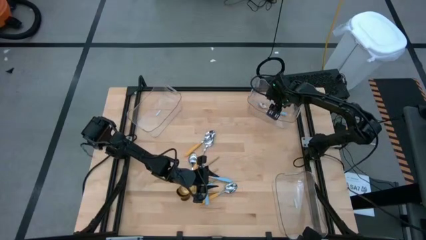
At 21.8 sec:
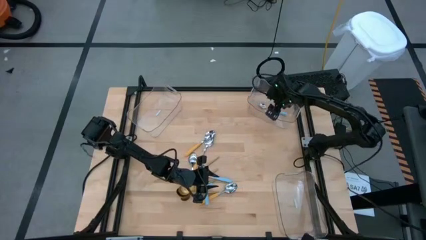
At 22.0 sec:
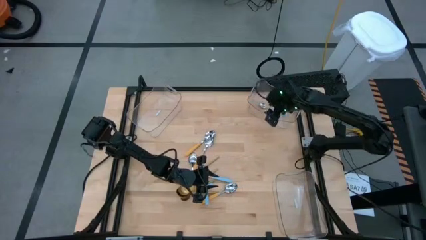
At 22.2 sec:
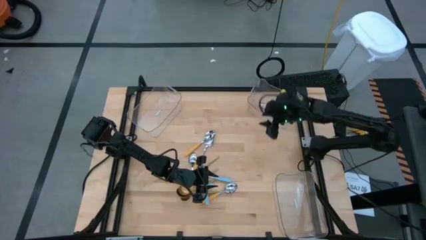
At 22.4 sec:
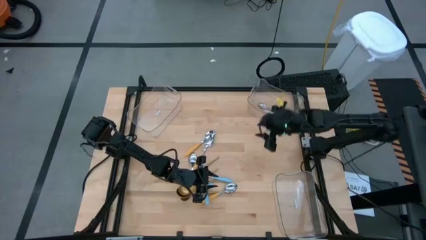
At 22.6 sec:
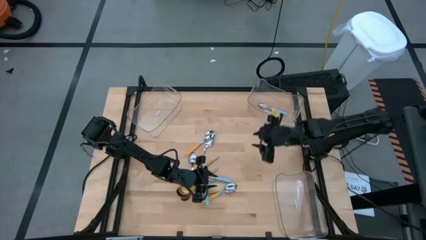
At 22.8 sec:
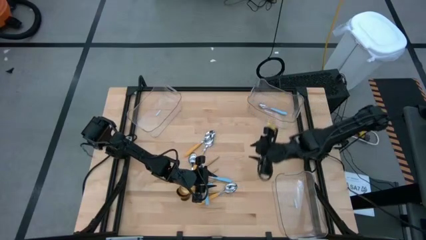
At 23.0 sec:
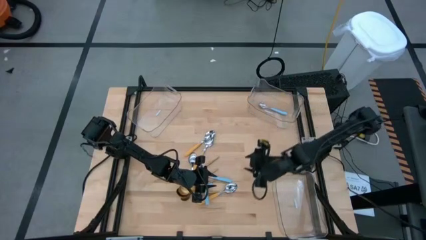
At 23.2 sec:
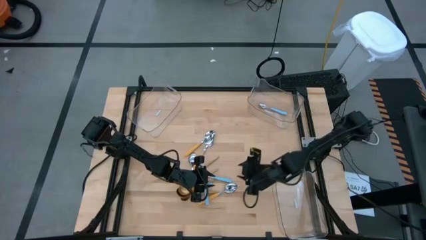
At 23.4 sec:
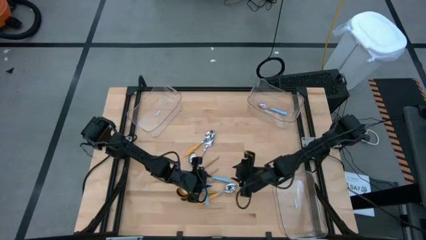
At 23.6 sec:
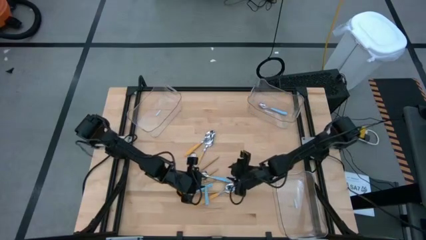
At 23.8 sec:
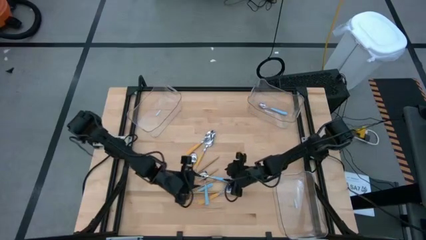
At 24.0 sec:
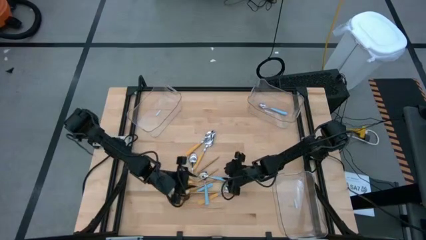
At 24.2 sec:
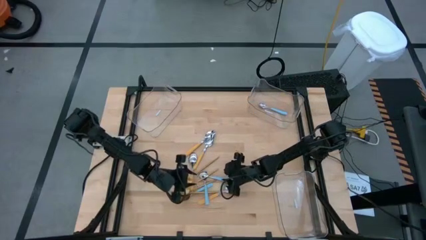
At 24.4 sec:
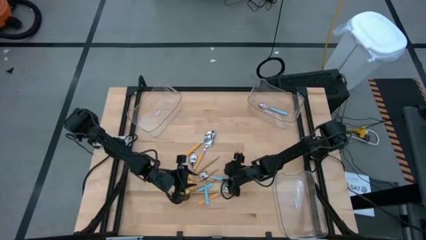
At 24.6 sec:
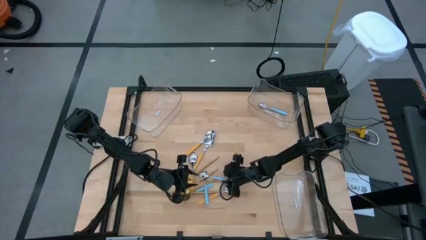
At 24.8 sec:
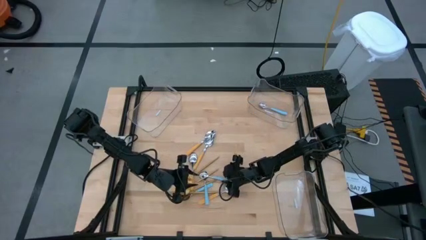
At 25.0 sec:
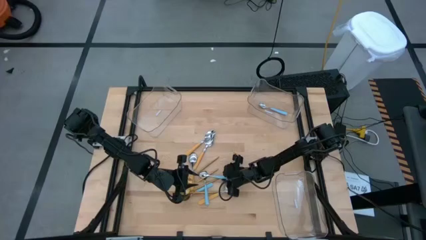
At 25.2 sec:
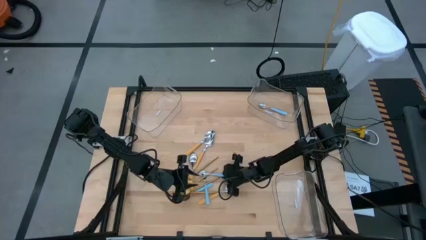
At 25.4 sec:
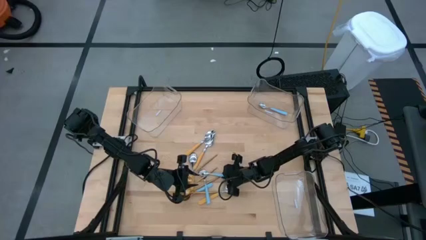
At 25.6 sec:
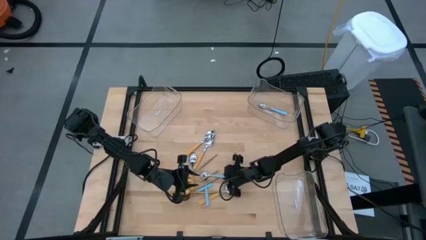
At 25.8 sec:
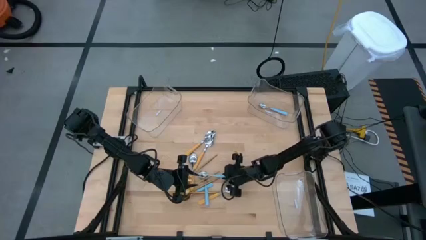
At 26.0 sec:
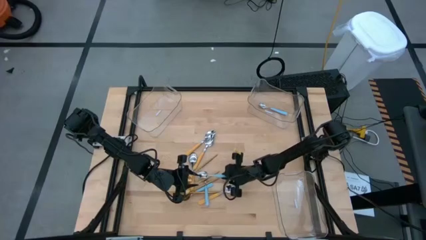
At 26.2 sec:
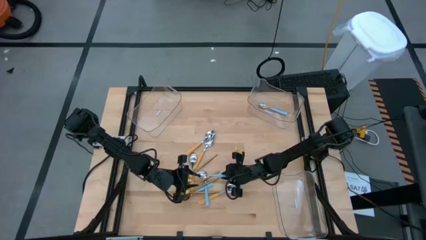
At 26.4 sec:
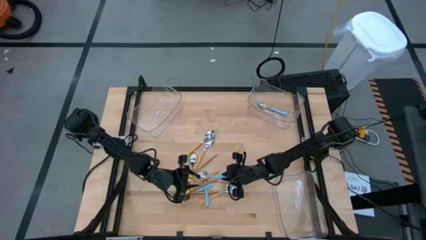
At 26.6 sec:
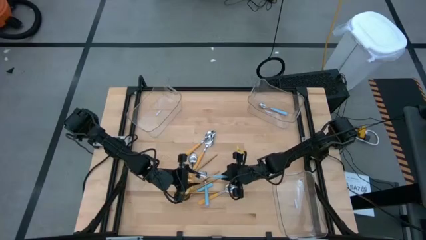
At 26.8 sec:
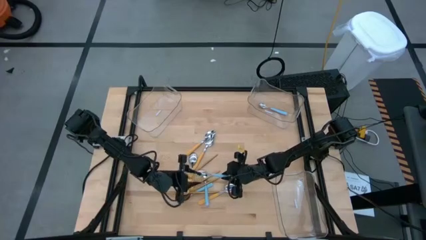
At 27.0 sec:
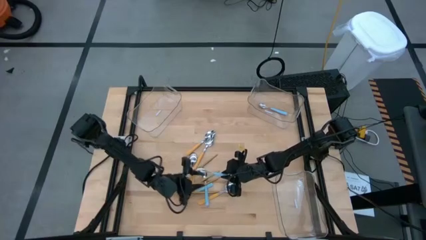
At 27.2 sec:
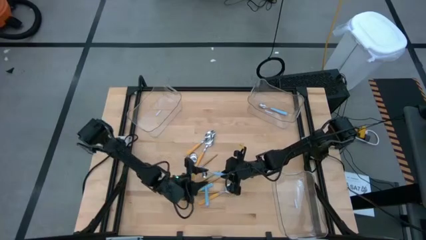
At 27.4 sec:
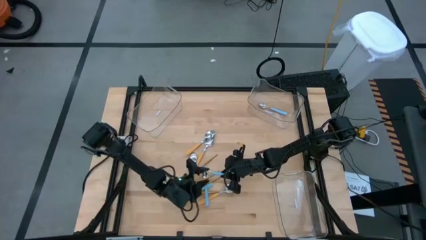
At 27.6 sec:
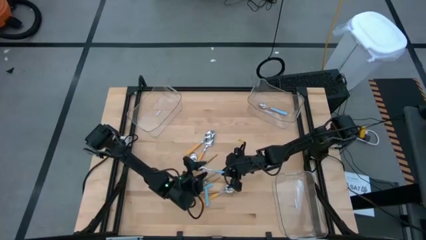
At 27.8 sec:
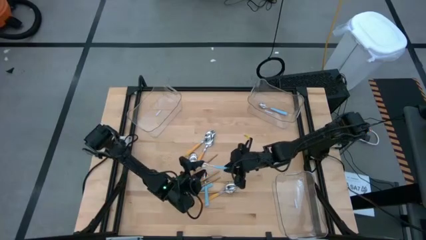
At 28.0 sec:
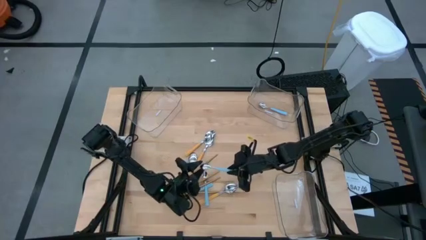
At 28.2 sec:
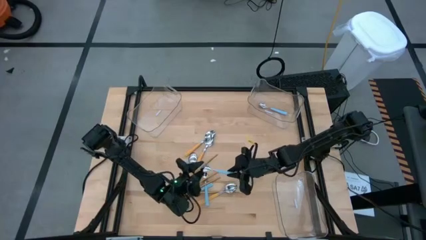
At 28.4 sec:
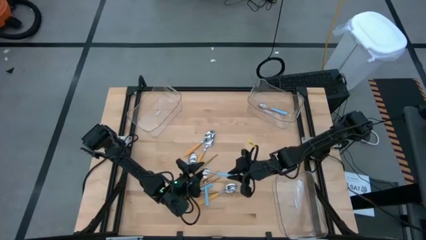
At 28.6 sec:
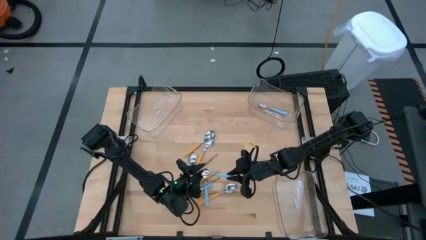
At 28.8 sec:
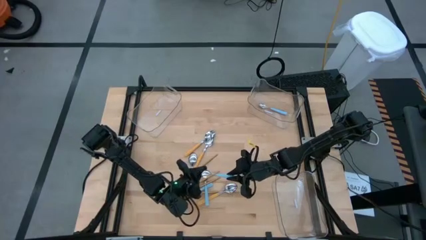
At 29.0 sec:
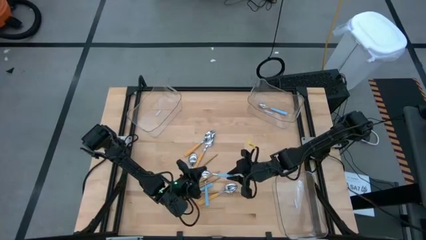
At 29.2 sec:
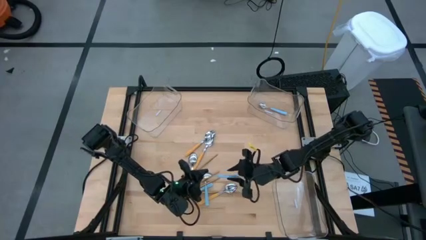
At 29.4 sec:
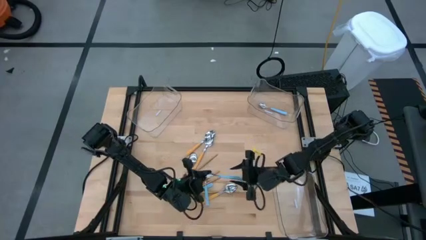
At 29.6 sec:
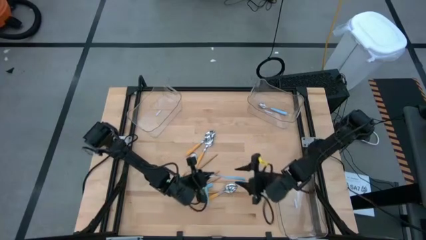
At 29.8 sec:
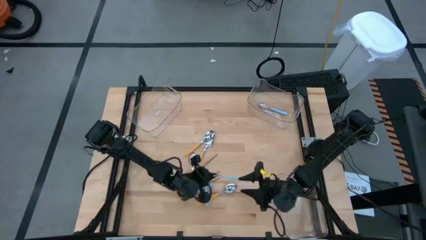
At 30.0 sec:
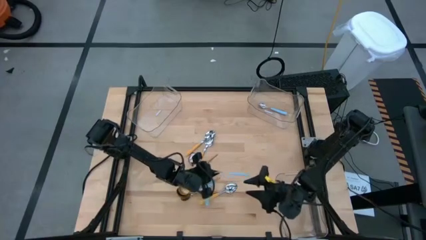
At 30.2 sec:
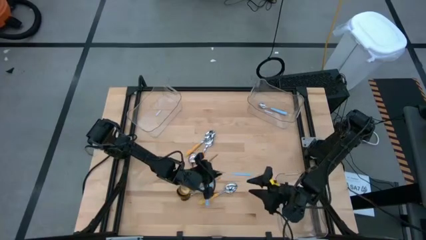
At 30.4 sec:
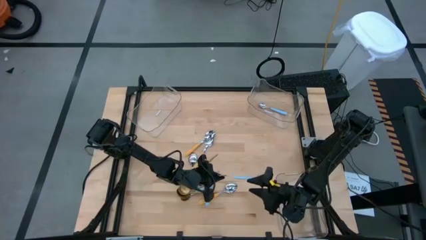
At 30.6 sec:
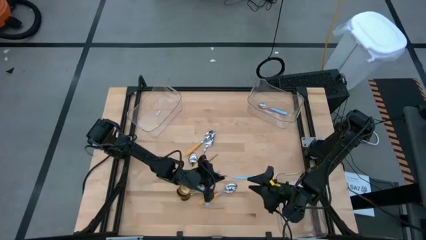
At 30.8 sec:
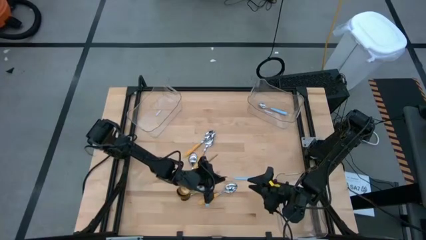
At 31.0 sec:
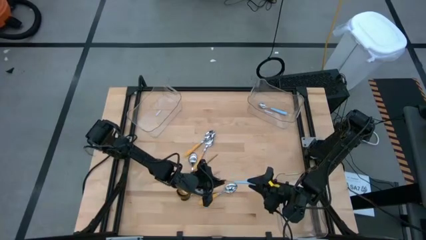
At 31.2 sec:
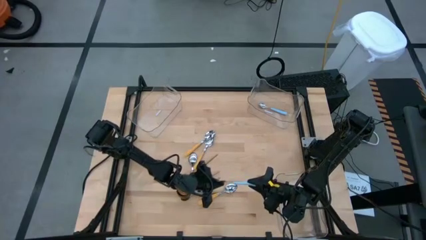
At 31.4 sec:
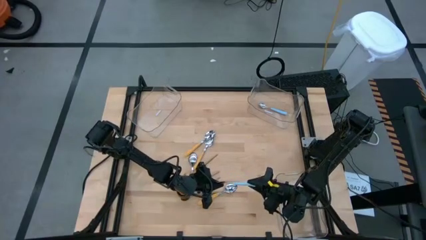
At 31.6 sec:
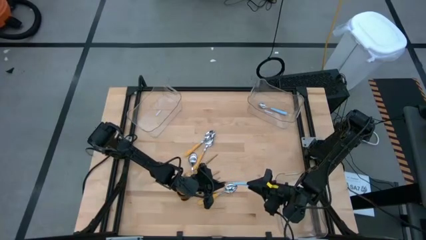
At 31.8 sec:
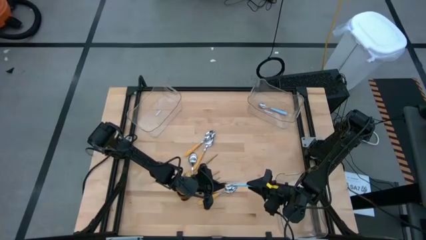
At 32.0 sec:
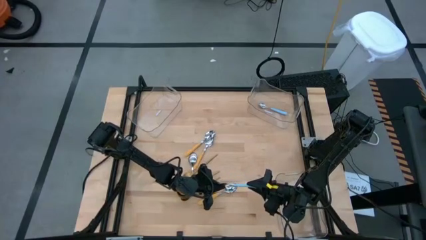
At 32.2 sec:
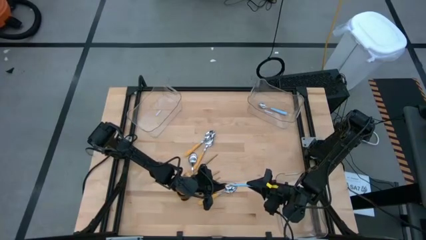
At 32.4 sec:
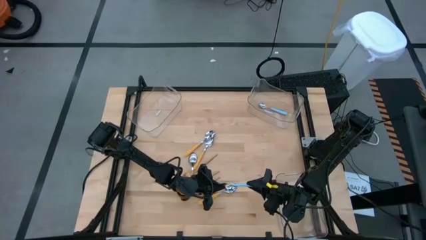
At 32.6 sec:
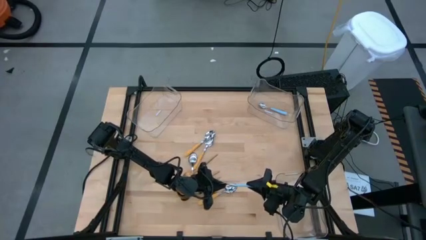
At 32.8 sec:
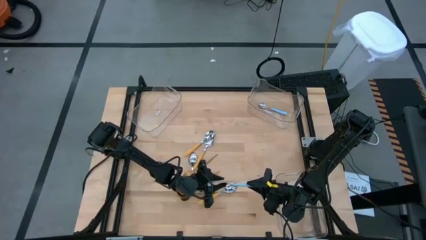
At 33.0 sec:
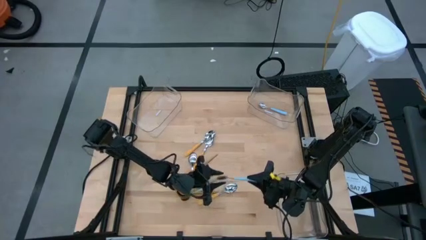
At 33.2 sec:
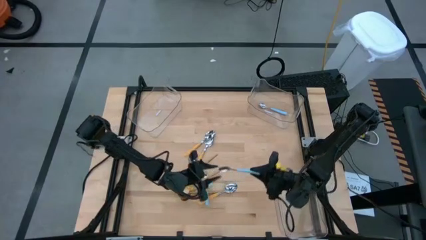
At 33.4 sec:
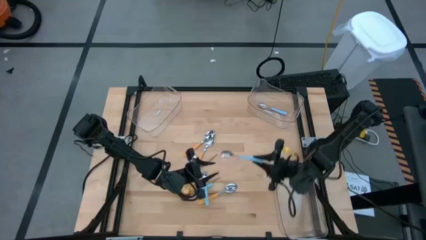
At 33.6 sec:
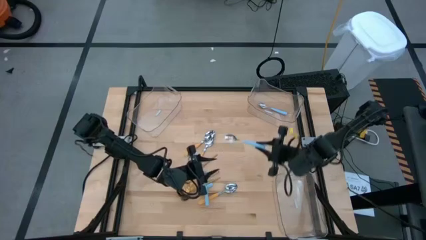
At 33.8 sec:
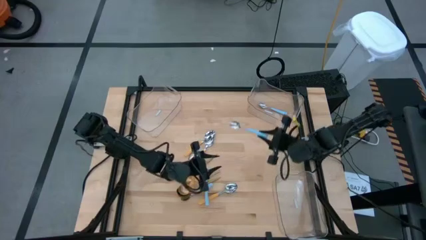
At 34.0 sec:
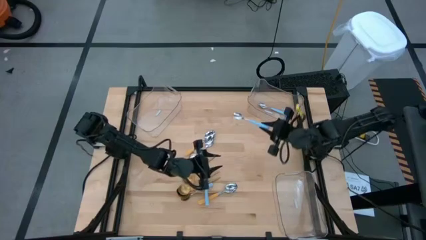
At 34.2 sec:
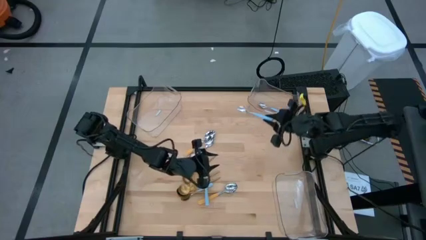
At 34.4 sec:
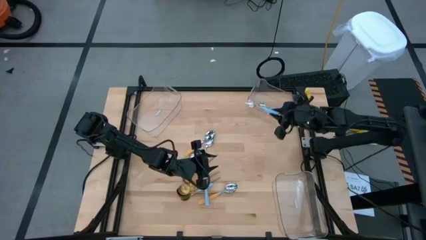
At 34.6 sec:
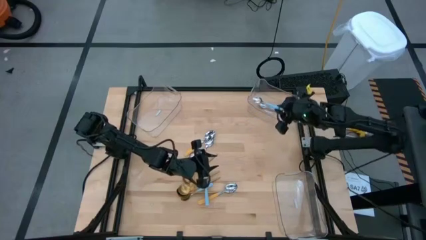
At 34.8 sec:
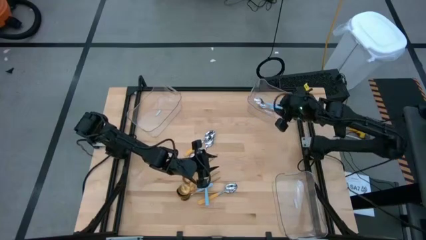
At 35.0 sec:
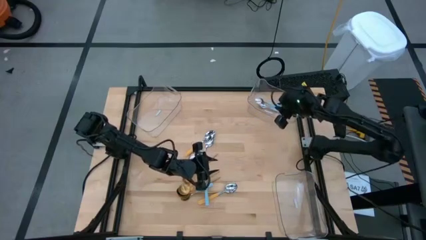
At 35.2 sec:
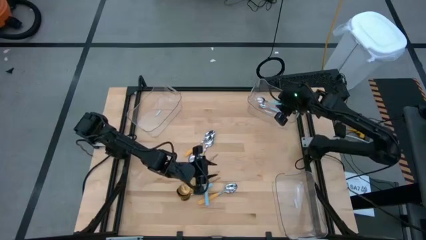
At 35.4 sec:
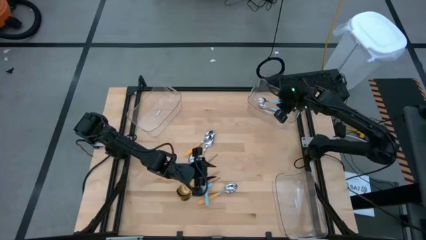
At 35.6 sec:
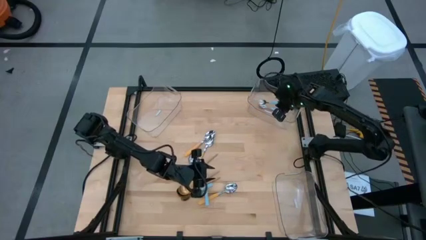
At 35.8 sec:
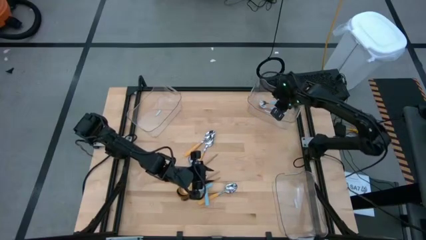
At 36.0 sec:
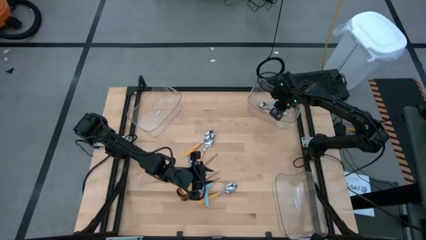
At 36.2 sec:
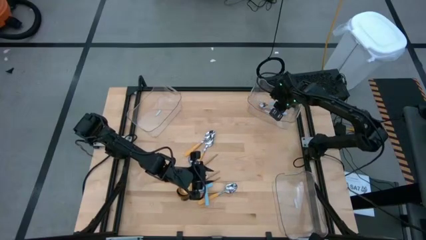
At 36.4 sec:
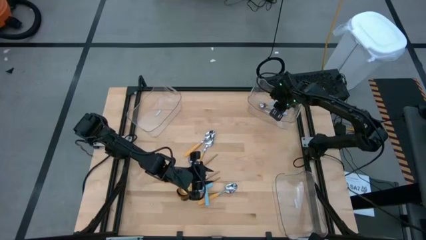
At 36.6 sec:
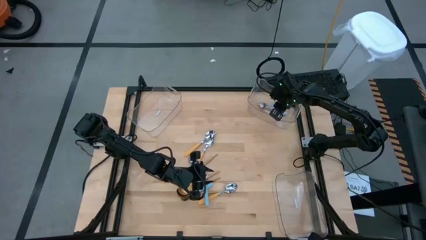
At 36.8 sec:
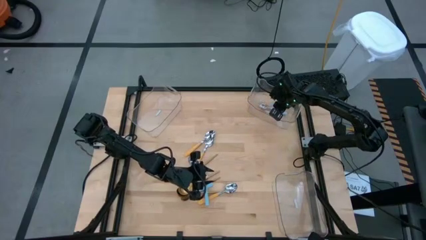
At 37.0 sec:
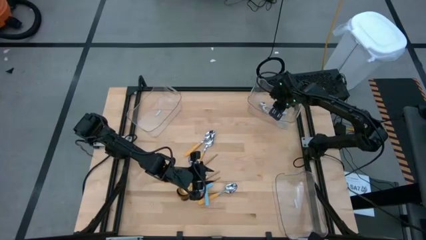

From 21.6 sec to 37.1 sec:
Task: Sort silverware by color (type)
Put the blue spoon into the top right transparent bin
